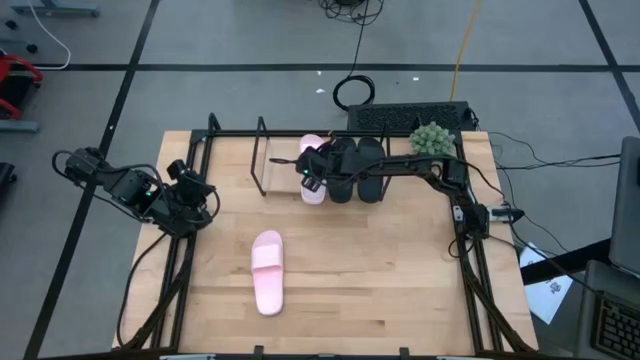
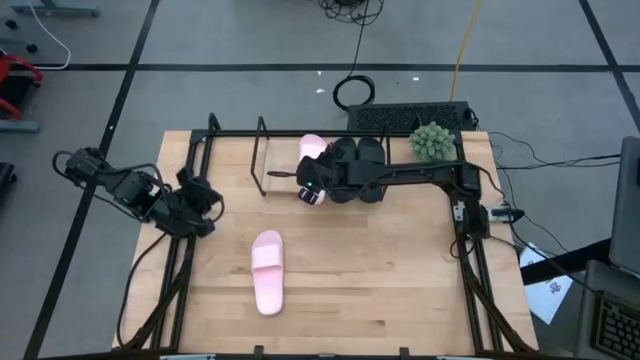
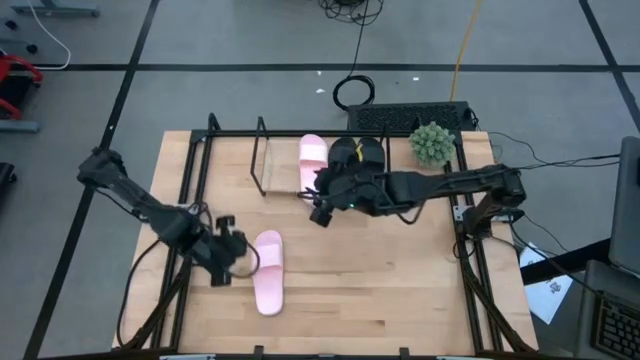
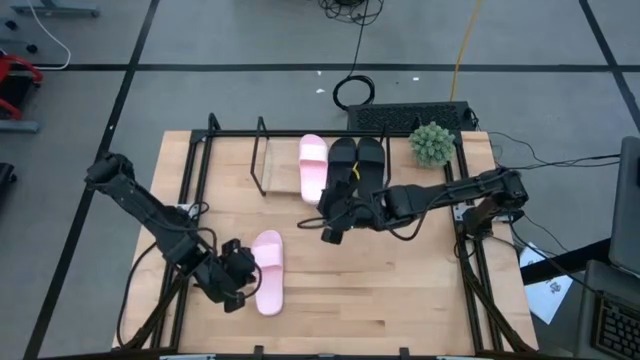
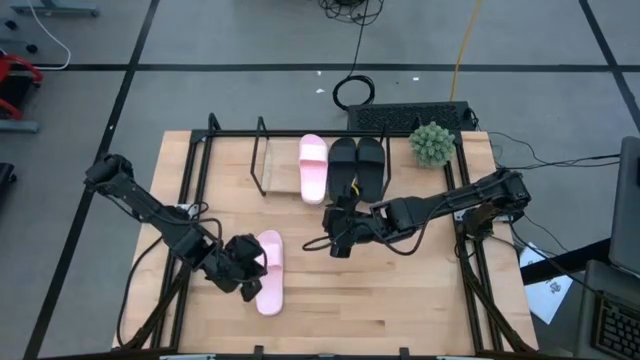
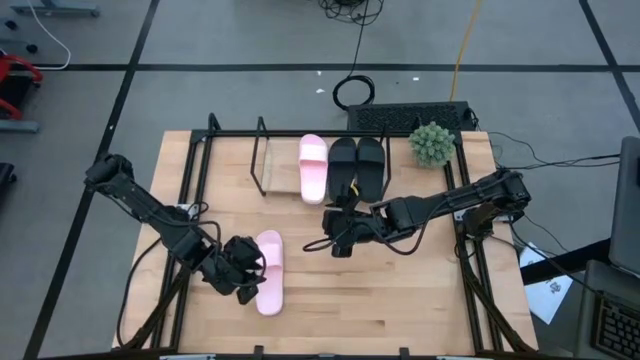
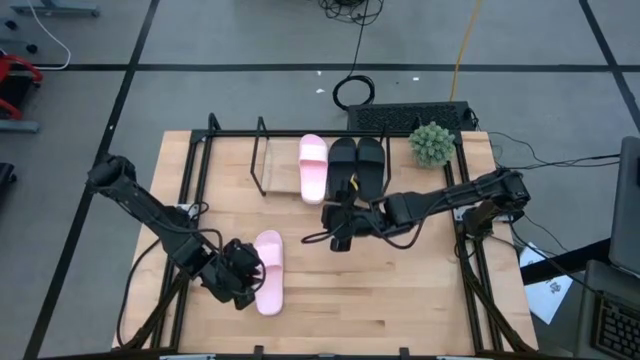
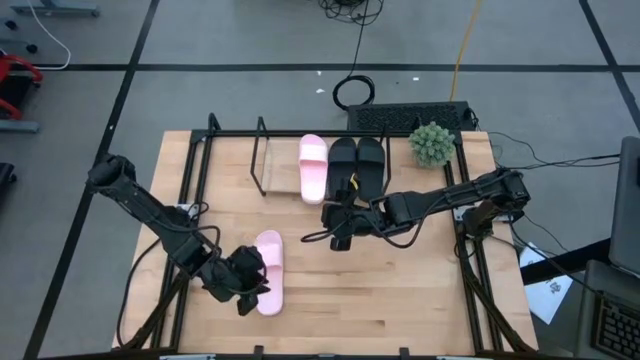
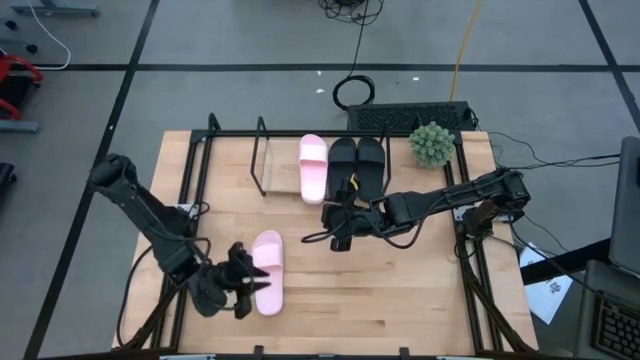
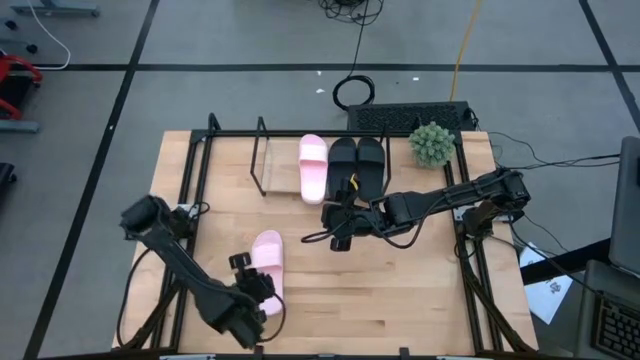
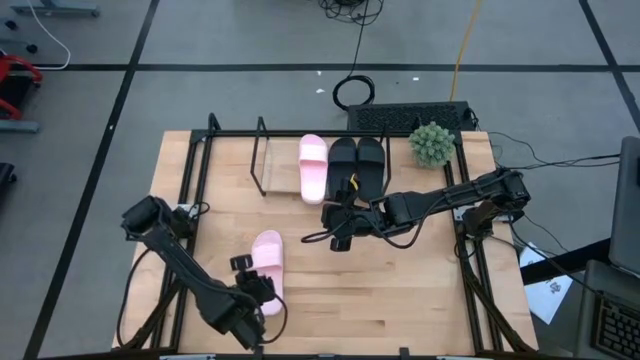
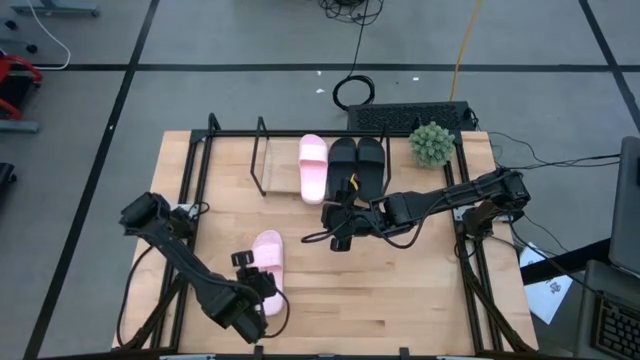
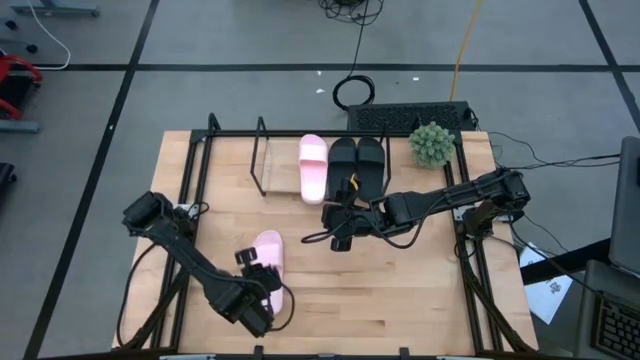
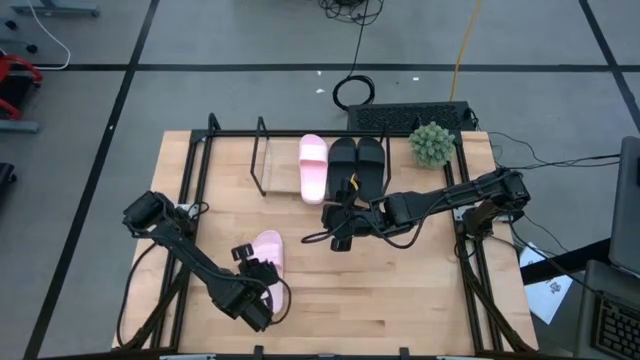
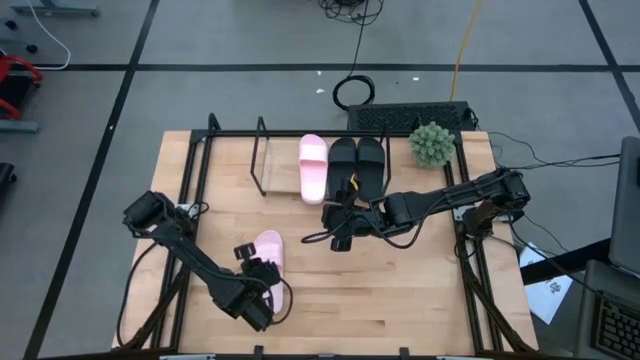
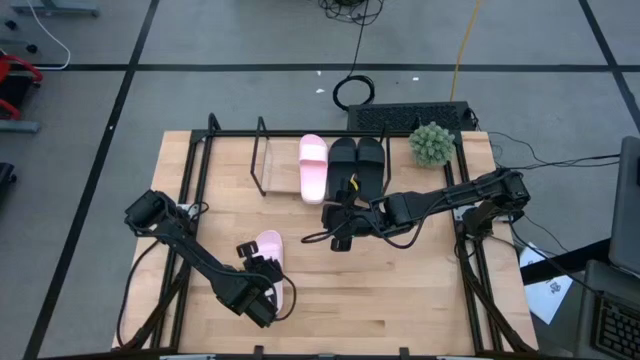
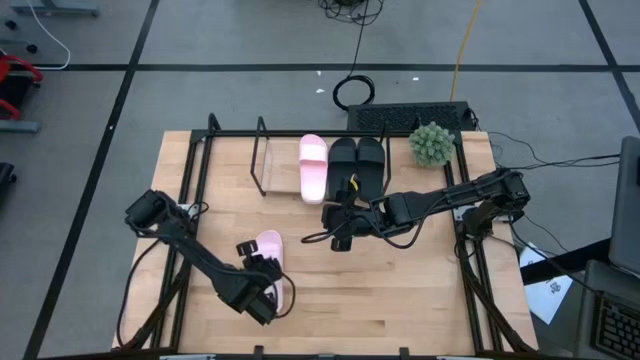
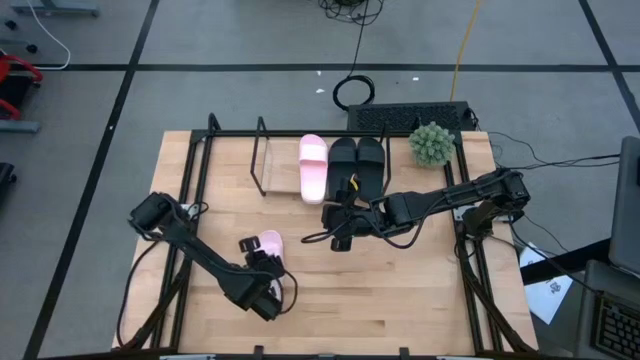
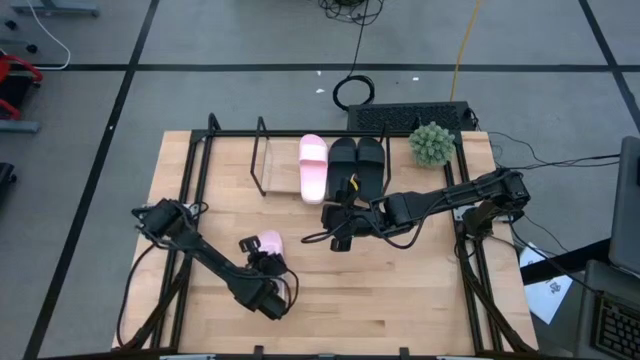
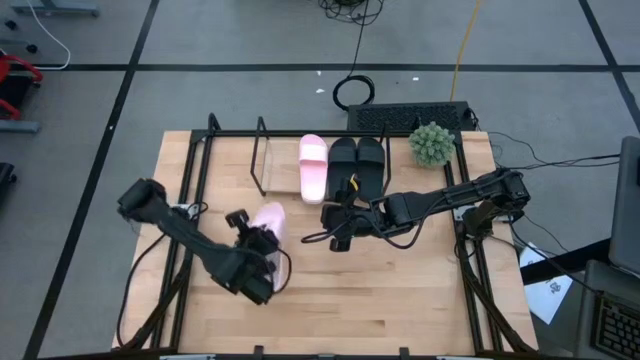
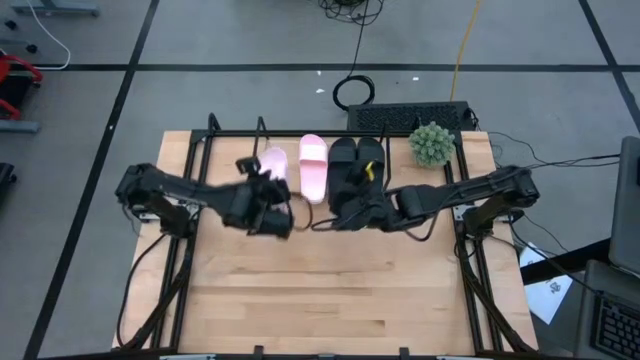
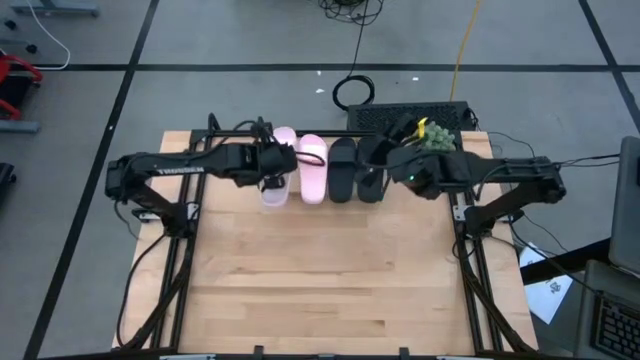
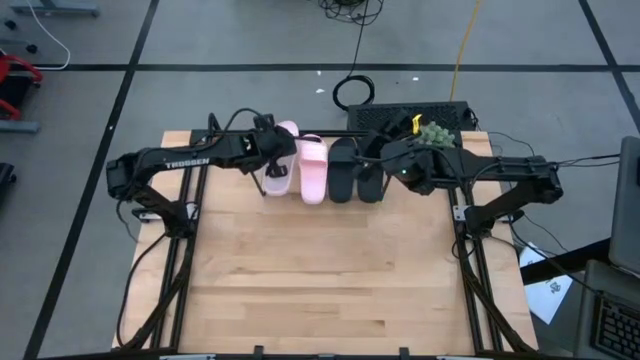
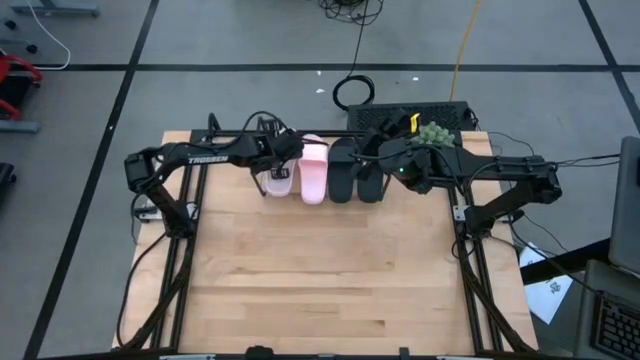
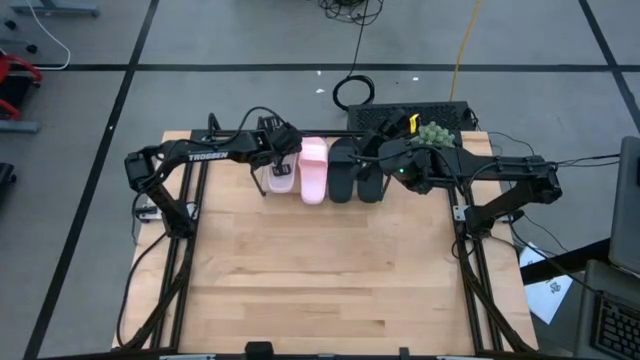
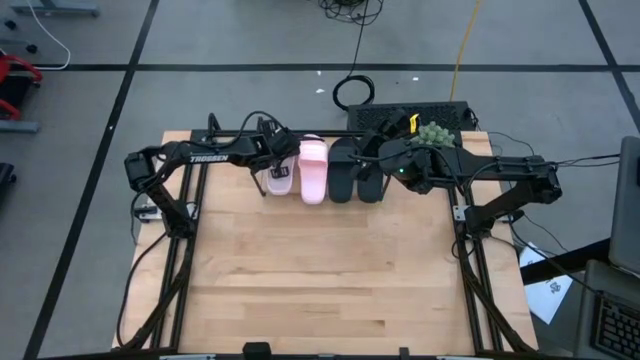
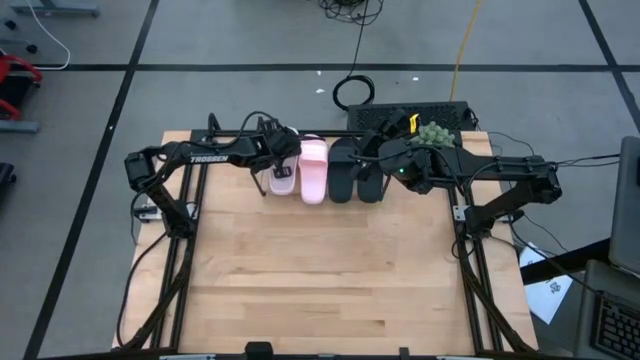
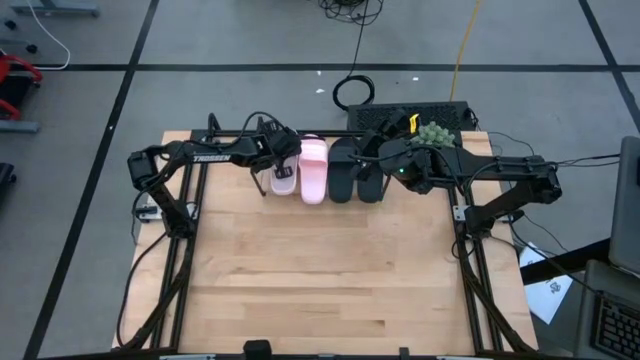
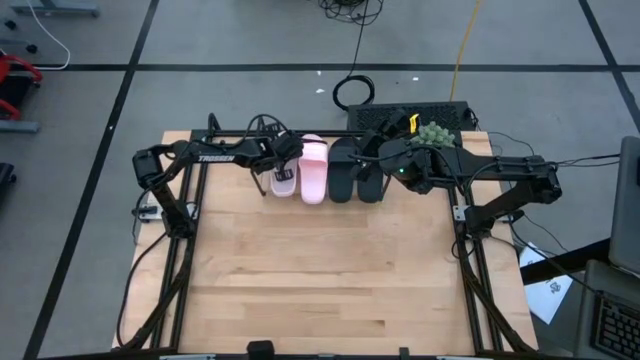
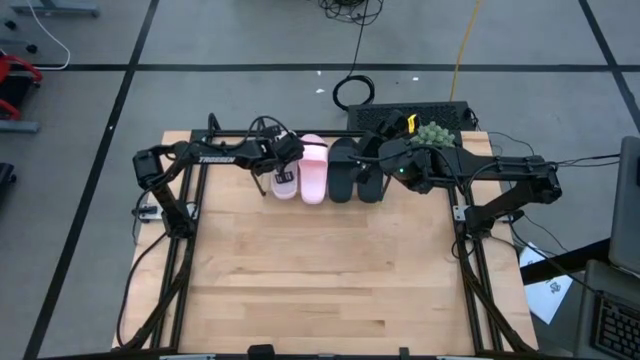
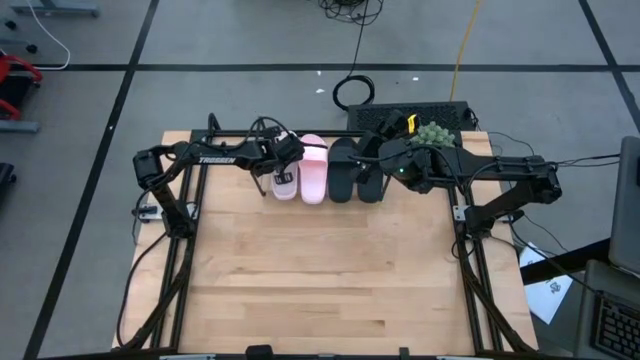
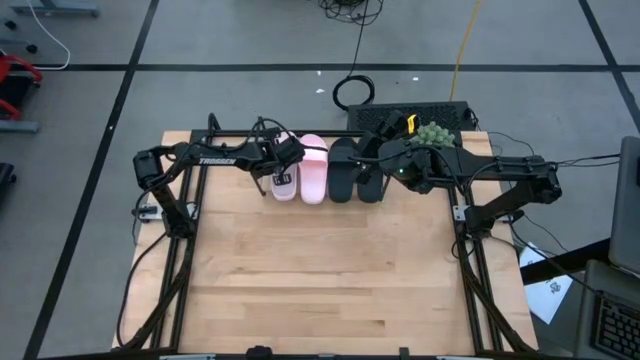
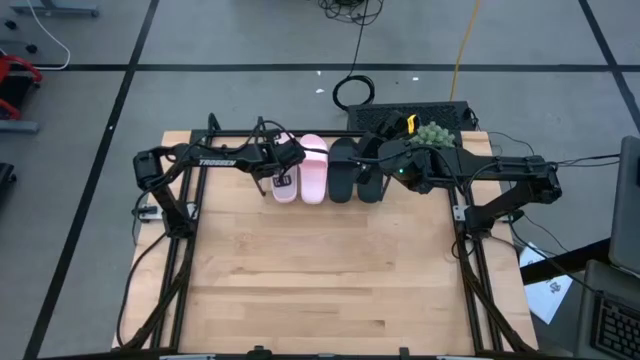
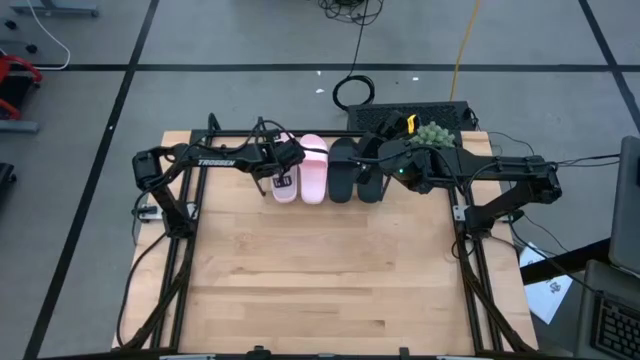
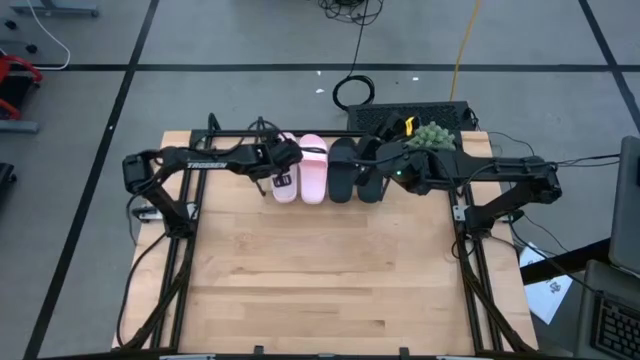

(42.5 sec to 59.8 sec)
Task: Pick and place slides into the shelf
Put the left pink slide on the shelf
